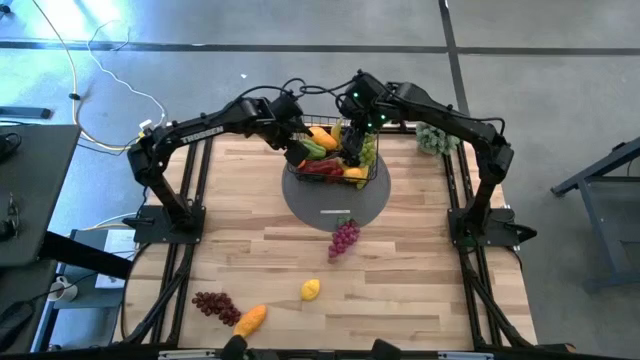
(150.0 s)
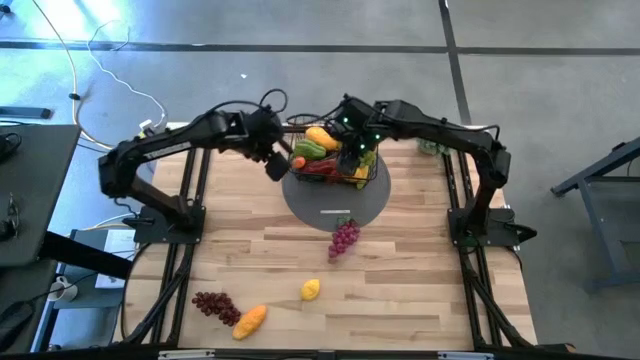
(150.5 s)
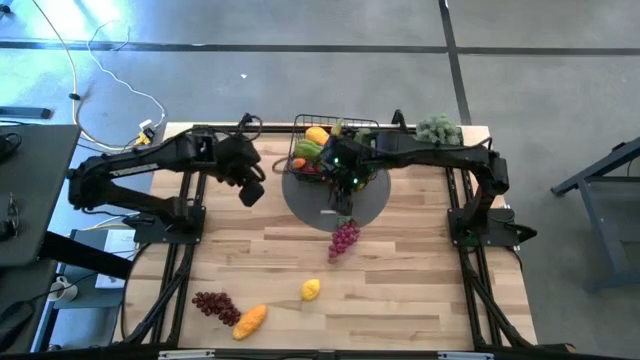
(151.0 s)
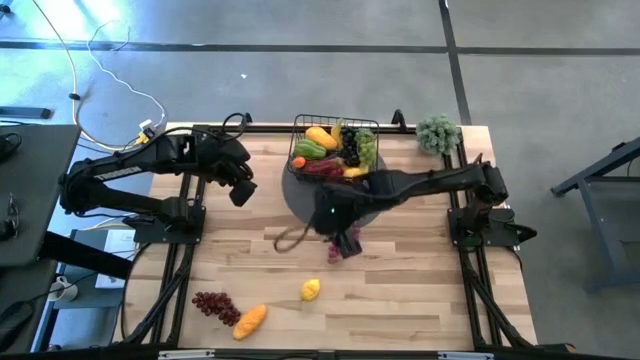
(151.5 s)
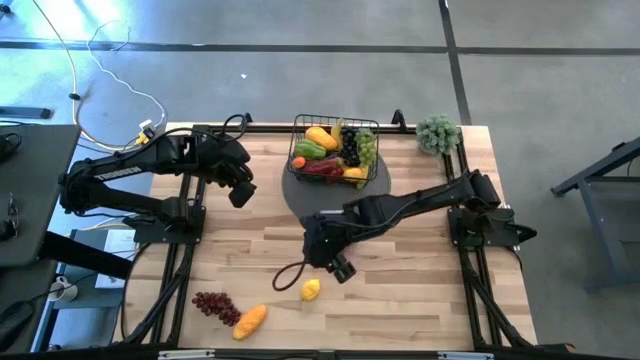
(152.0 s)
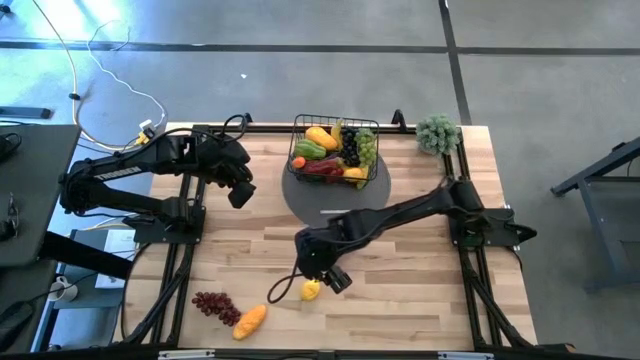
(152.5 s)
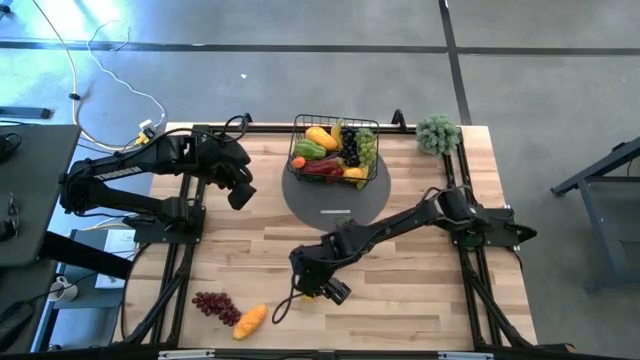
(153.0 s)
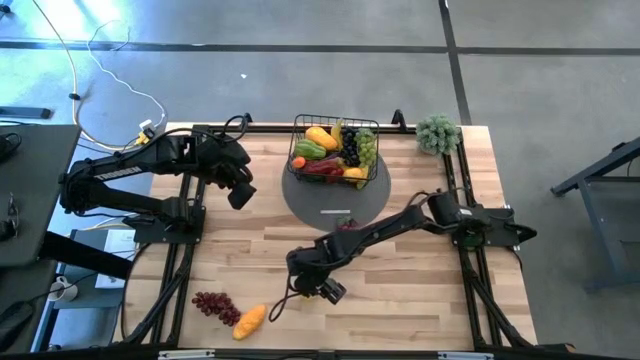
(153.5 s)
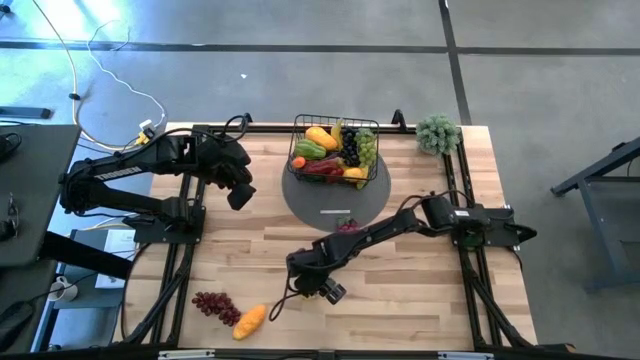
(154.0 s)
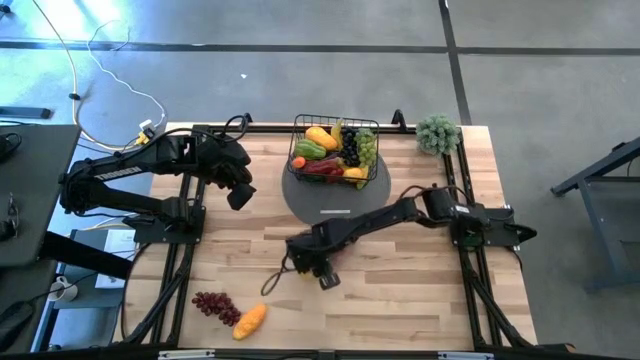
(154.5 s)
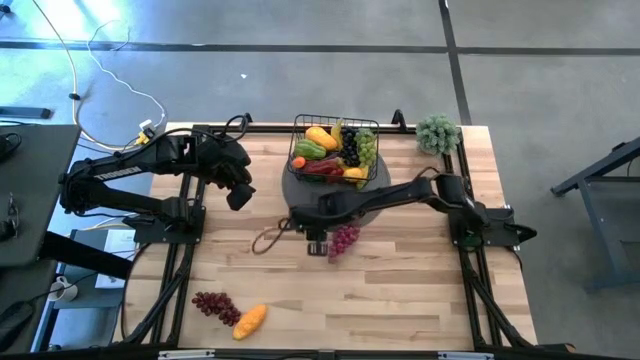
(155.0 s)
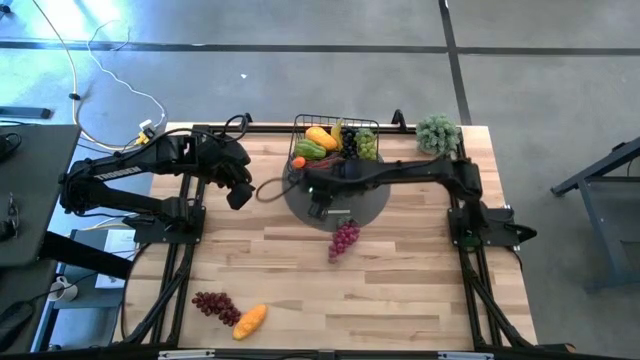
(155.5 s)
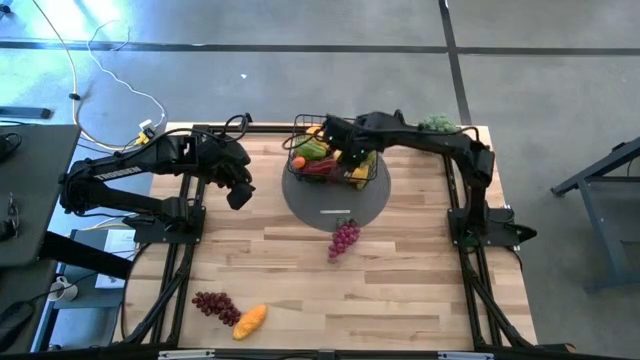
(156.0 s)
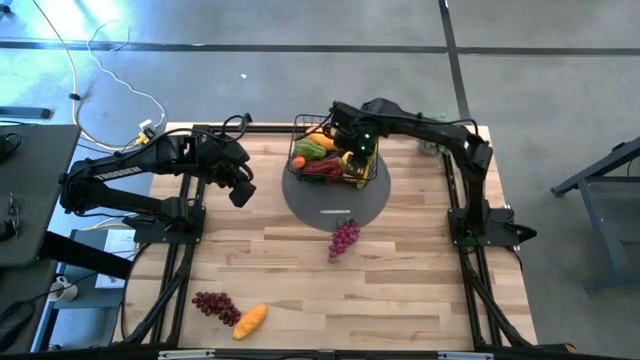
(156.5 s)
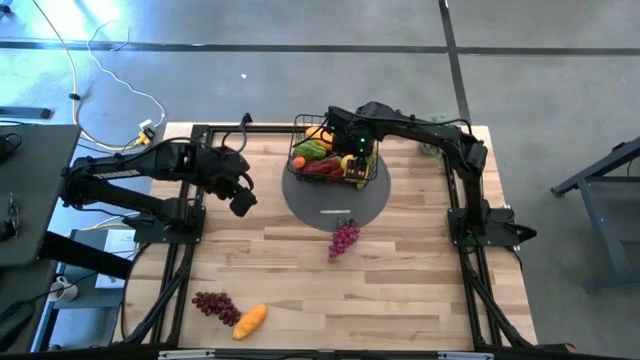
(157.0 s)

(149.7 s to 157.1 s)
Task: Build produce basket
Put the yellow lemon into the wire basket

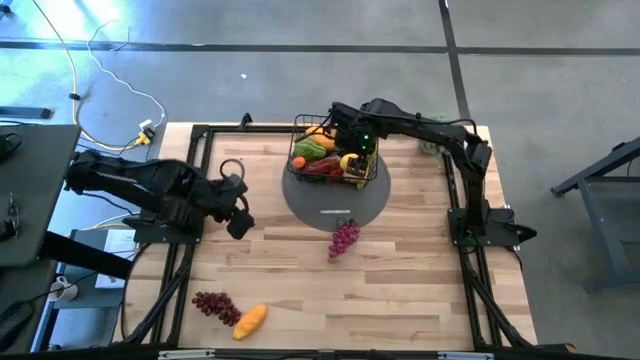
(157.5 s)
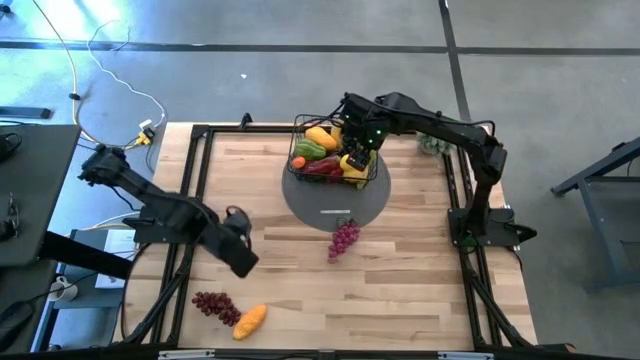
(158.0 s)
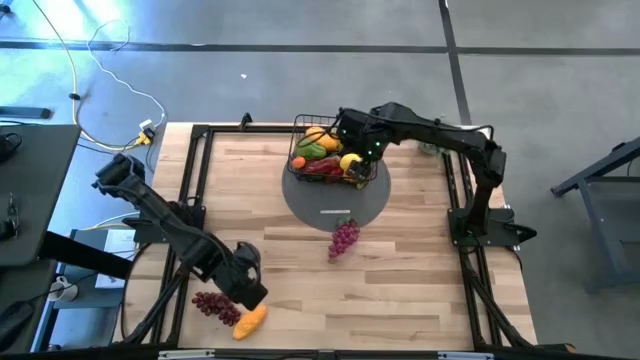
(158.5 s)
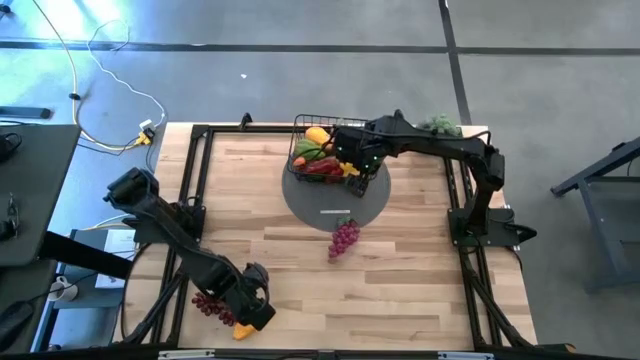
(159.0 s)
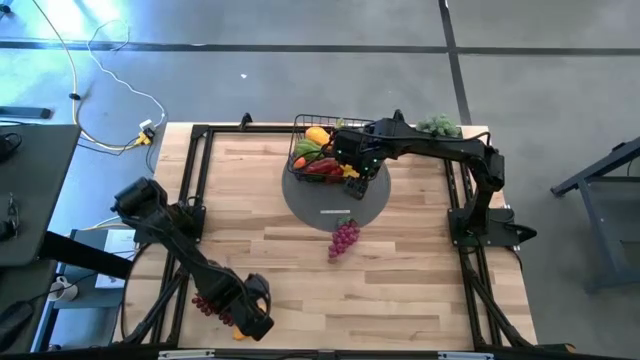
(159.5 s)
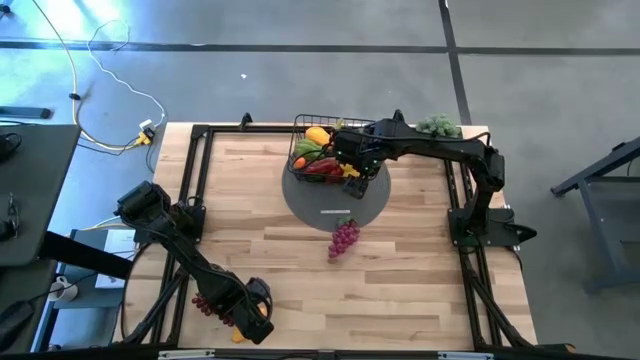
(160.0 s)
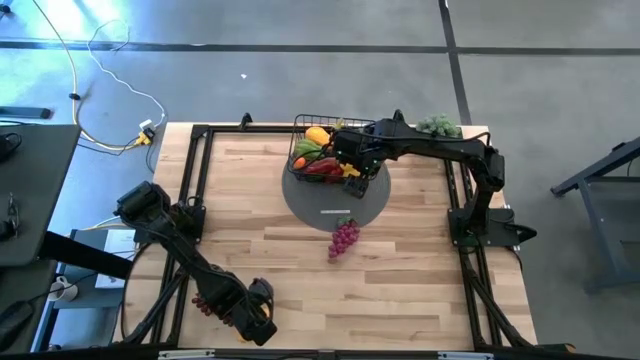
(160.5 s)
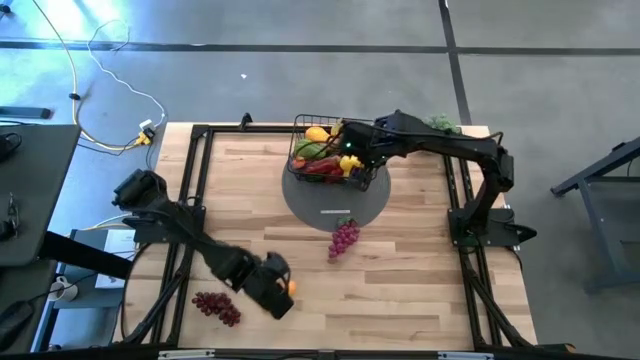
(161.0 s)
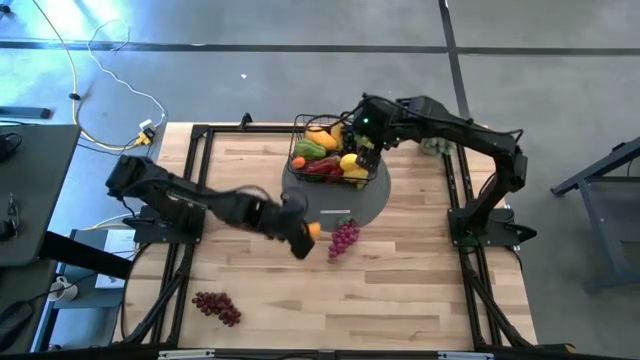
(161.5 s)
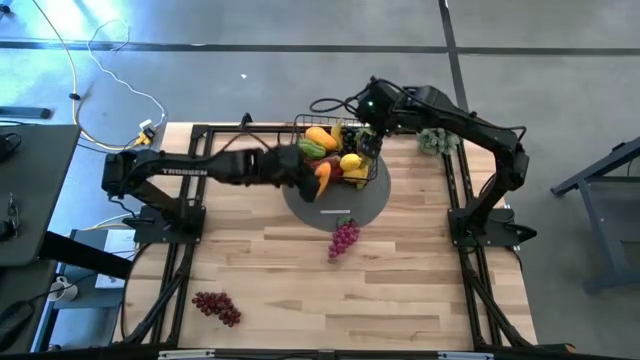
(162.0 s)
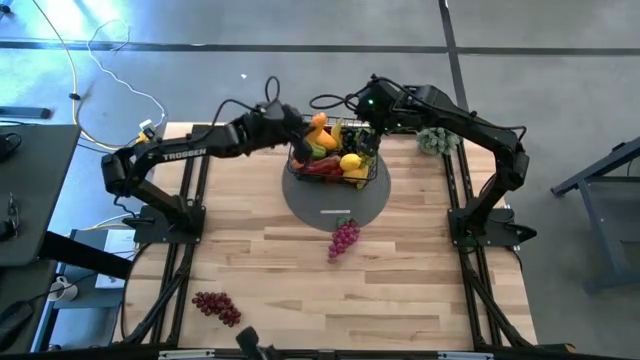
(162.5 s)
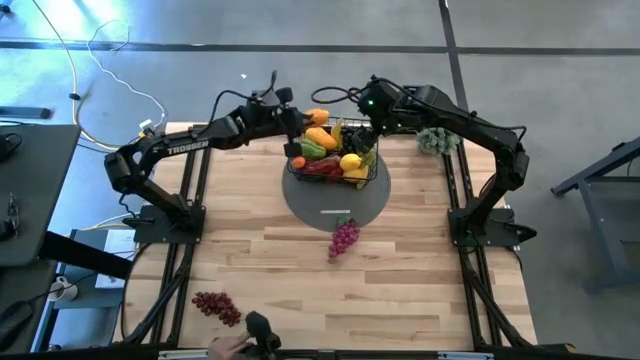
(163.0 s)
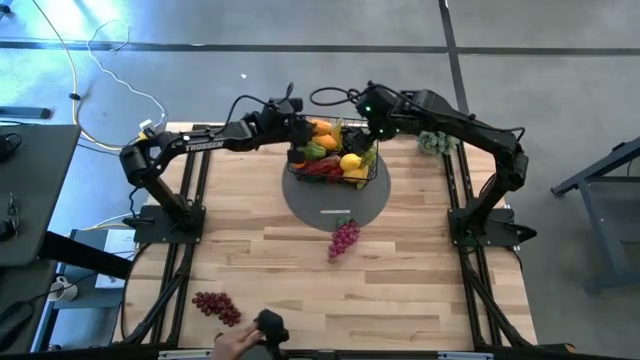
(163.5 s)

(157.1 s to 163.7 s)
Put the yellow mango into the wire basket

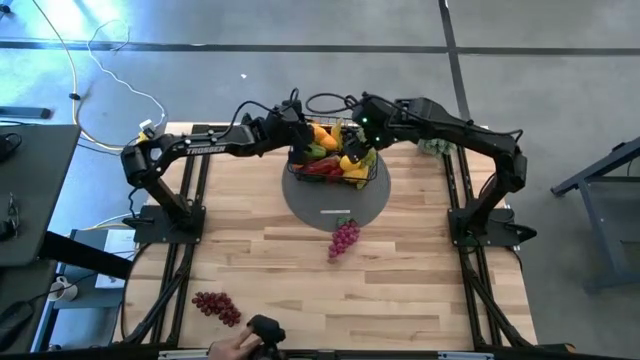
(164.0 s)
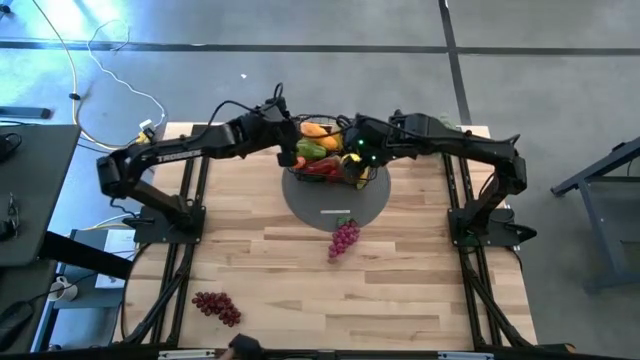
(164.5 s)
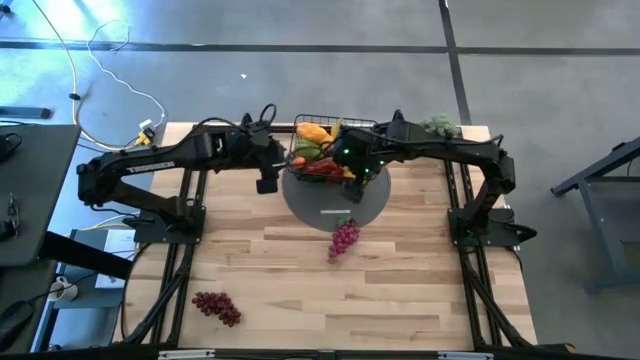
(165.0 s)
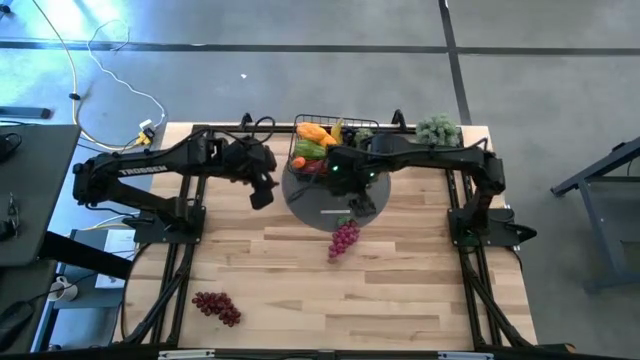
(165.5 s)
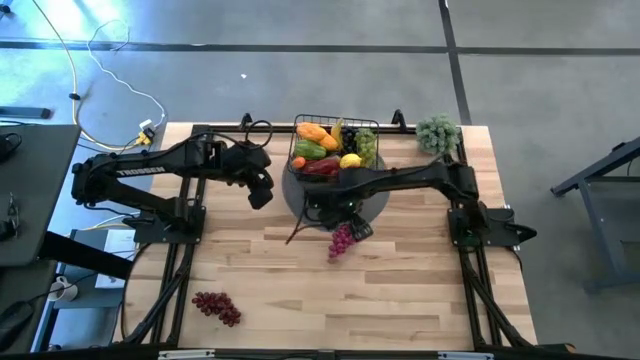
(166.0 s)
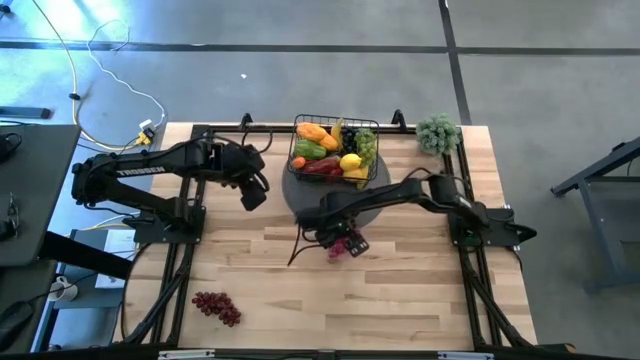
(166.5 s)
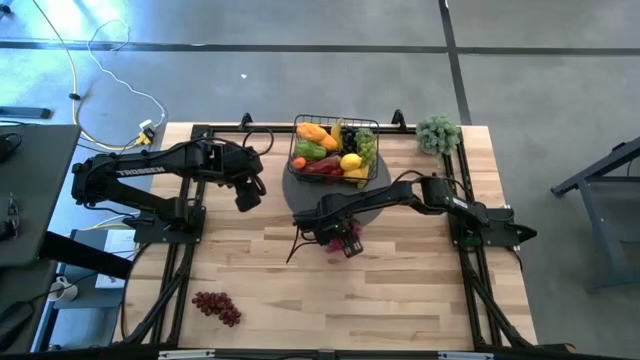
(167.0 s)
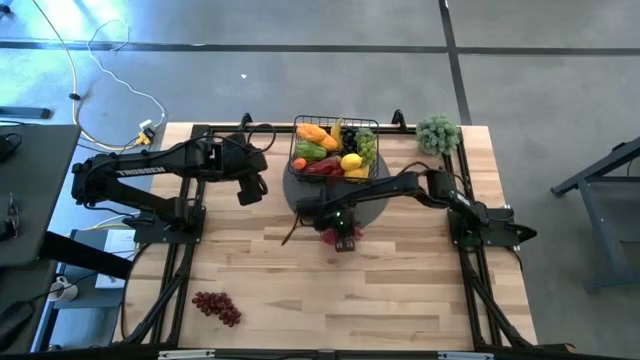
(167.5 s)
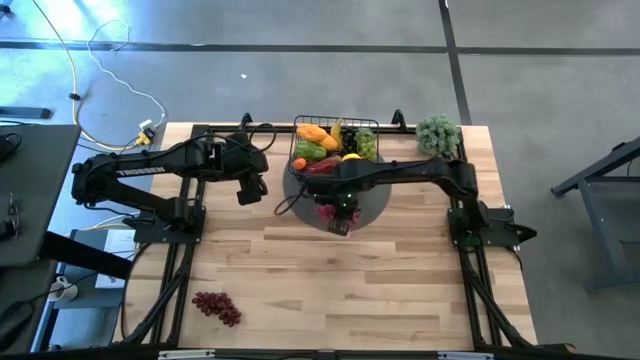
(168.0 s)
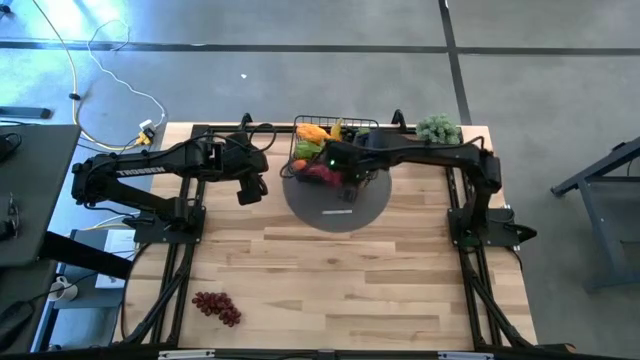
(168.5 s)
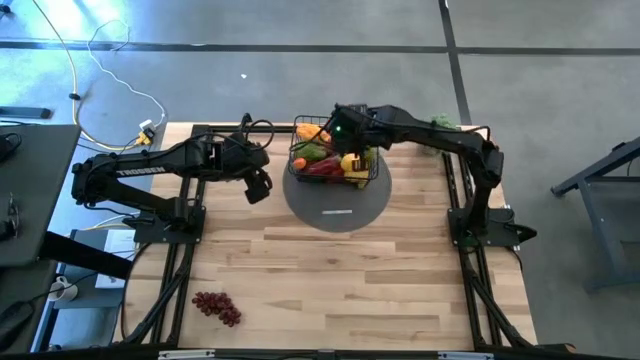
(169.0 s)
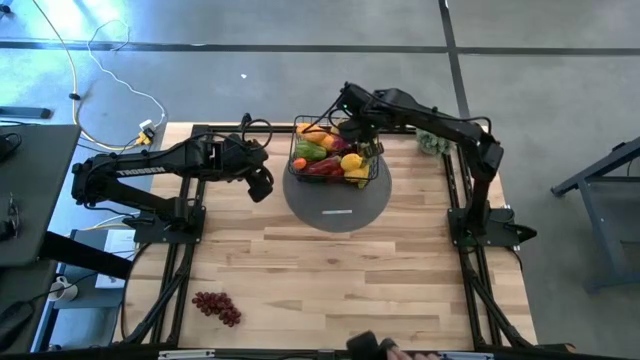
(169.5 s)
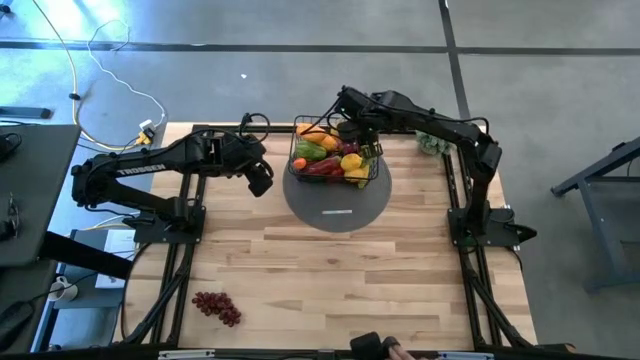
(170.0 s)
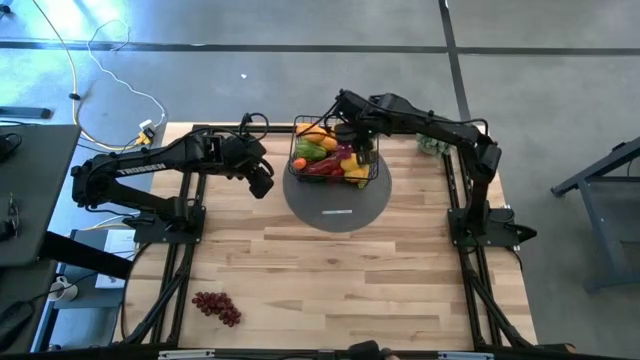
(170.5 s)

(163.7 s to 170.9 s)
Put the pink grapes into the wire basket
